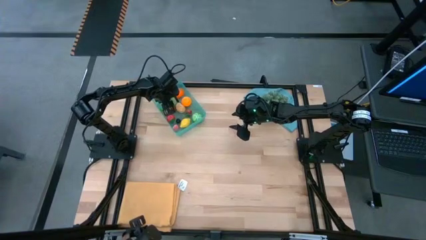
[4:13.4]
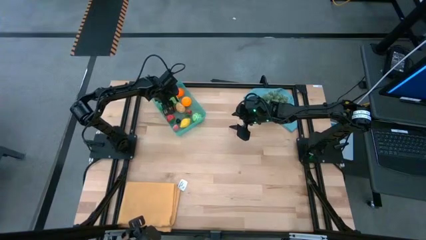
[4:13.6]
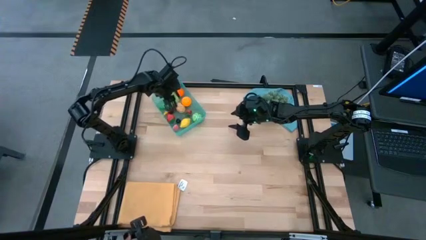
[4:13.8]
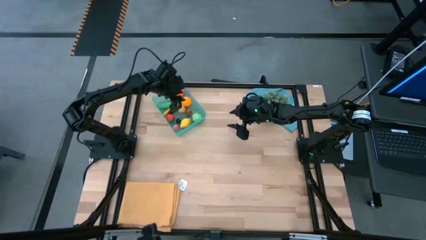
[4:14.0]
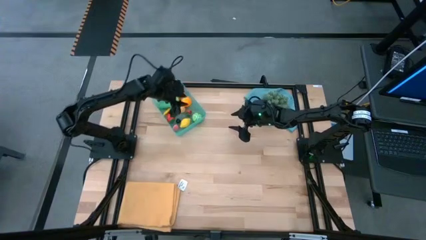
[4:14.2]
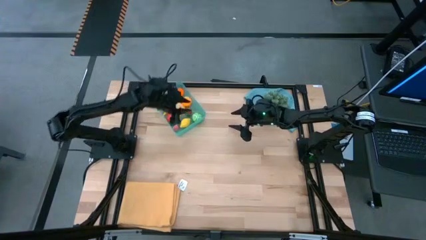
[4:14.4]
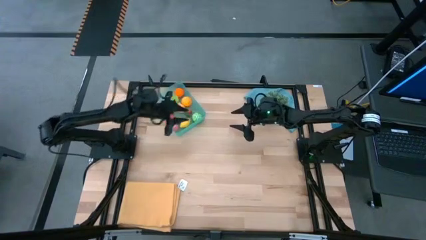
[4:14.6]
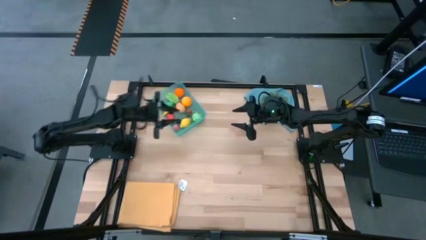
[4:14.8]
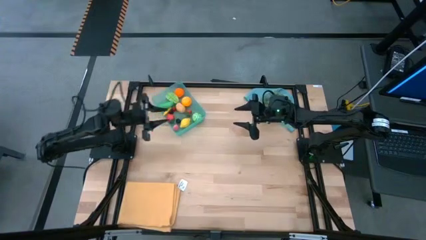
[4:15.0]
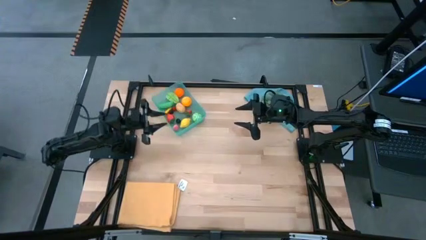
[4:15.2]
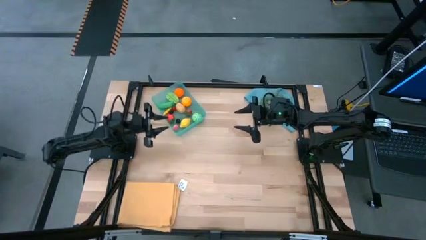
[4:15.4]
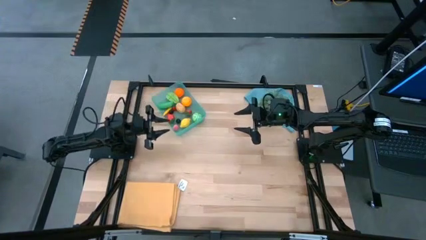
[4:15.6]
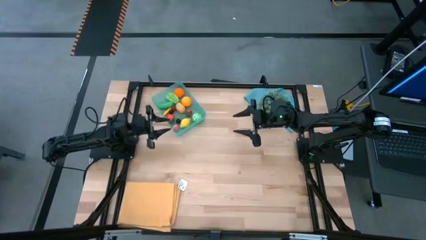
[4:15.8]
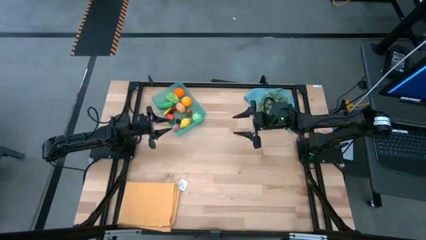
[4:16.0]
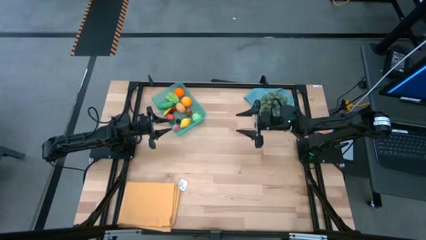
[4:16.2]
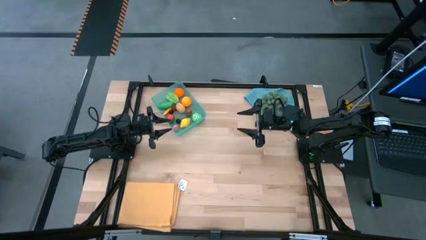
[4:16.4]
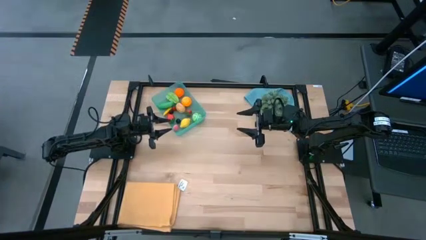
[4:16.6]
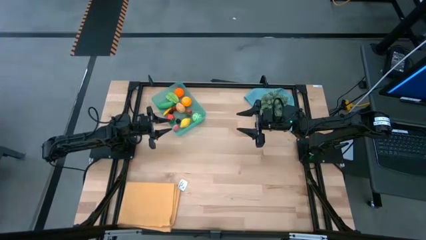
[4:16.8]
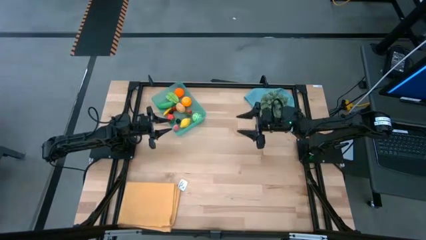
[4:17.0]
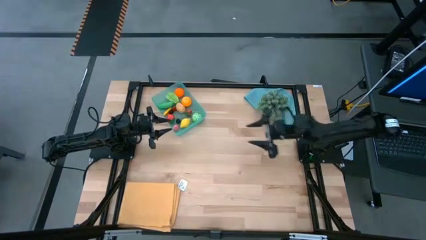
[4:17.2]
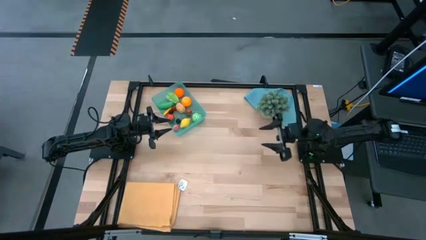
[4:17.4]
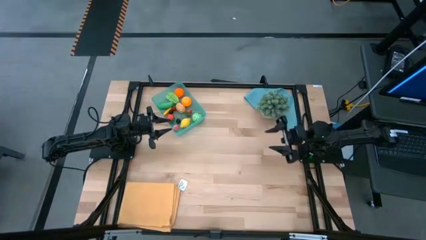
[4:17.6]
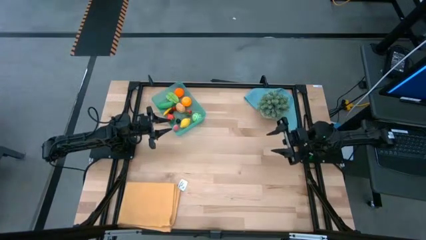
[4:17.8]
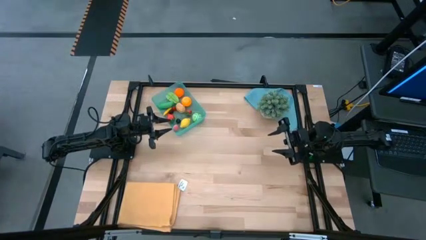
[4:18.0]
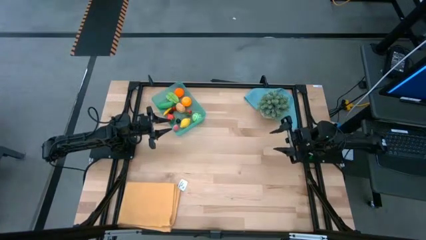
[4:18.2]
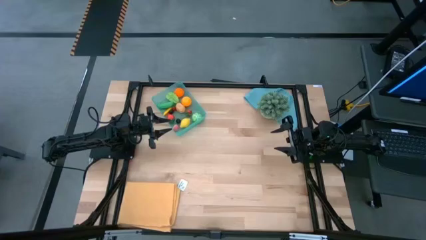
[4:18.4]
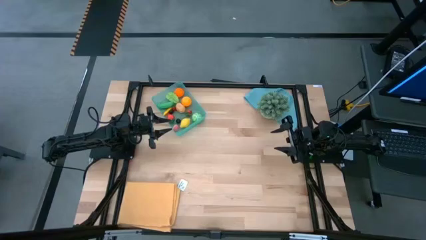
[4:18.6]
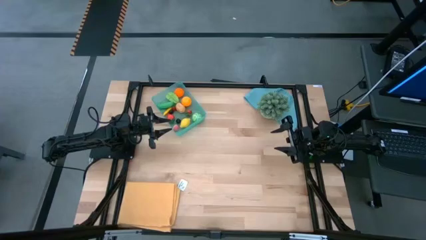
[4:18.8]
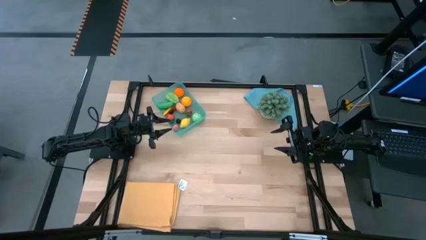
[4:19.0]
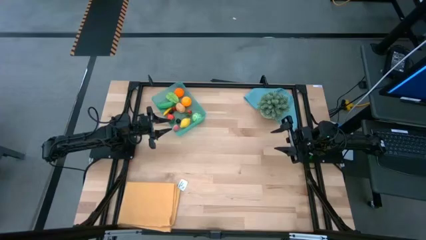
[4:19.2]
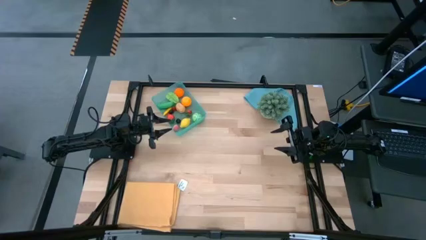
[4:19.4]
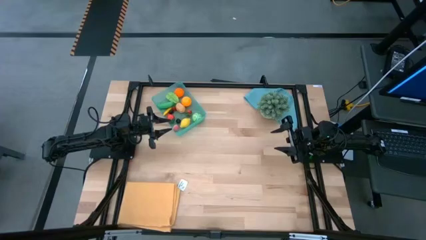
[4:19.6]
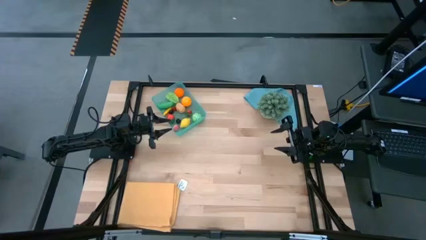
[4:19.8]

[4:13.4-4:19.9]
Task: Pick and placing Produce into tupperware
Return to Home Position

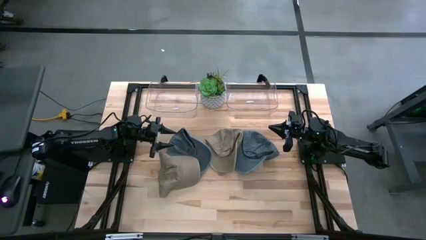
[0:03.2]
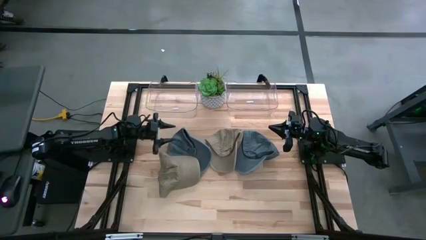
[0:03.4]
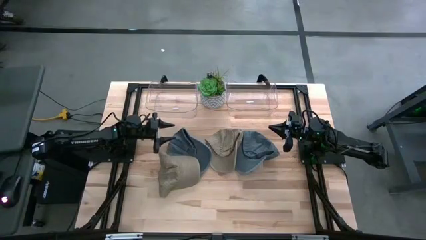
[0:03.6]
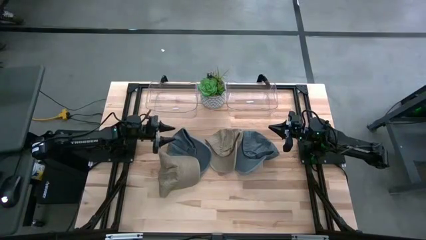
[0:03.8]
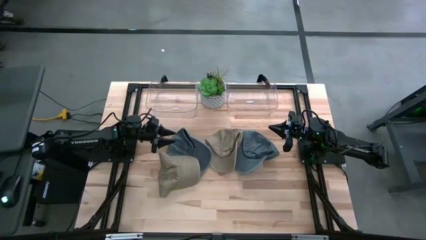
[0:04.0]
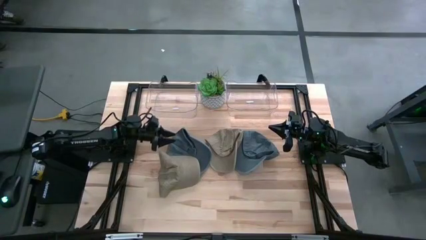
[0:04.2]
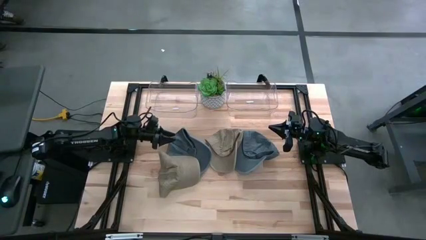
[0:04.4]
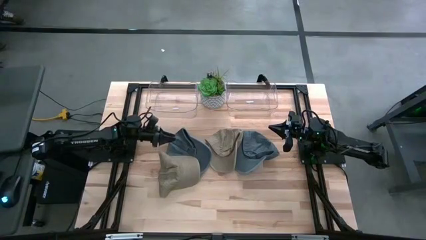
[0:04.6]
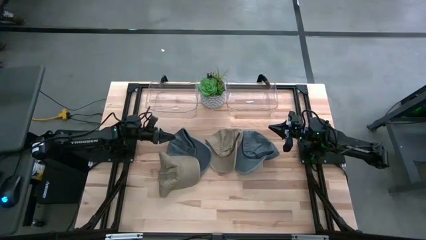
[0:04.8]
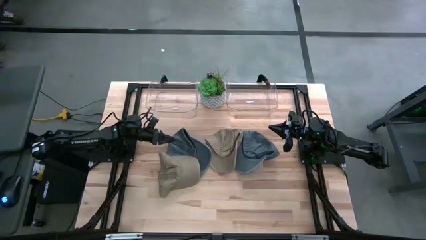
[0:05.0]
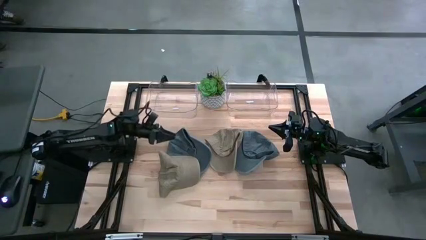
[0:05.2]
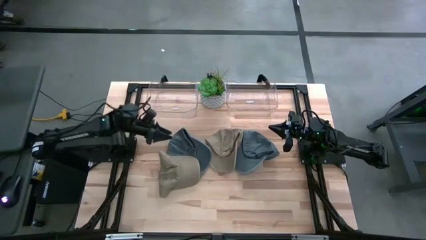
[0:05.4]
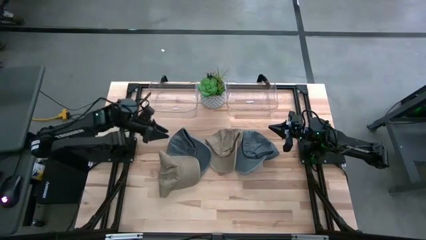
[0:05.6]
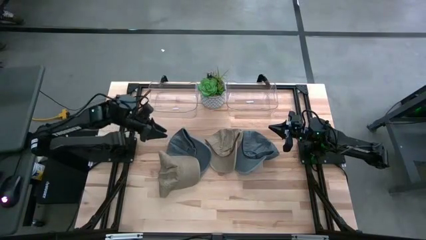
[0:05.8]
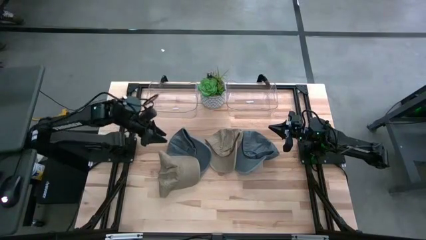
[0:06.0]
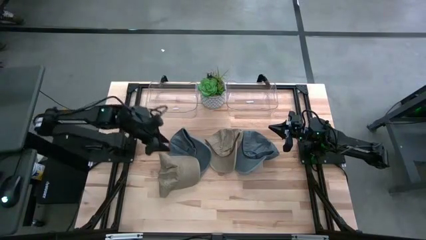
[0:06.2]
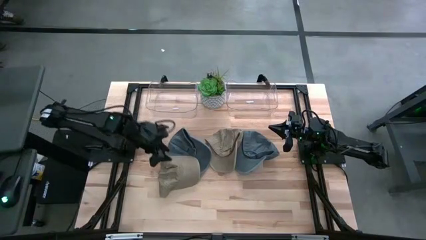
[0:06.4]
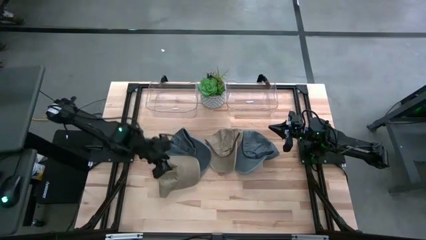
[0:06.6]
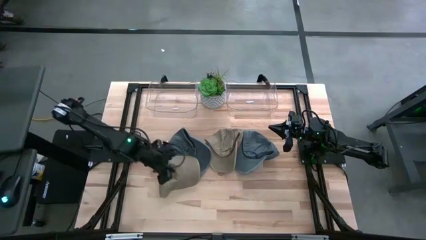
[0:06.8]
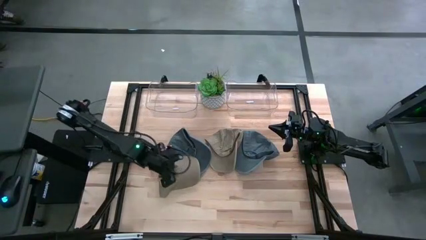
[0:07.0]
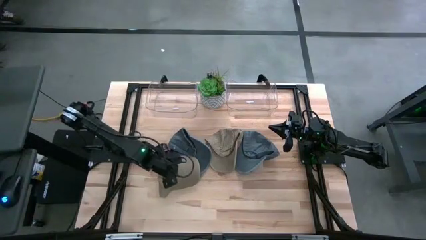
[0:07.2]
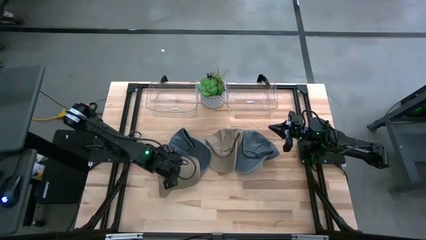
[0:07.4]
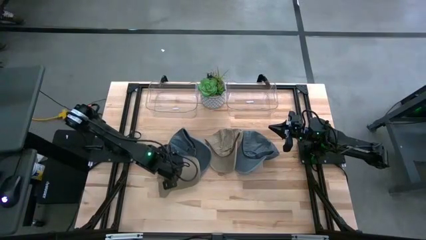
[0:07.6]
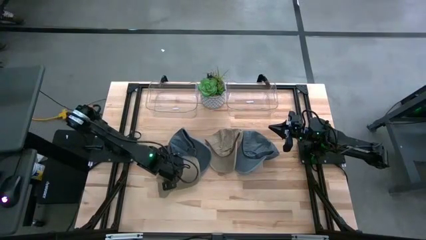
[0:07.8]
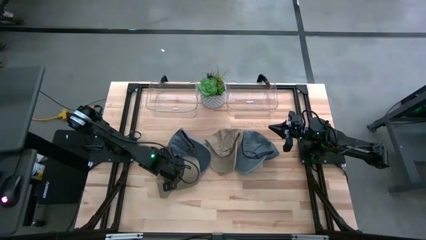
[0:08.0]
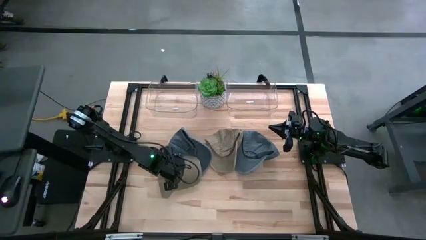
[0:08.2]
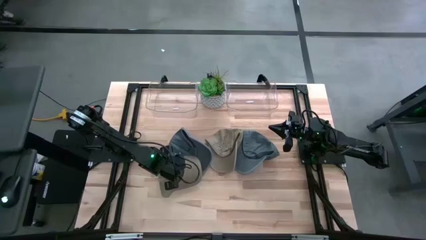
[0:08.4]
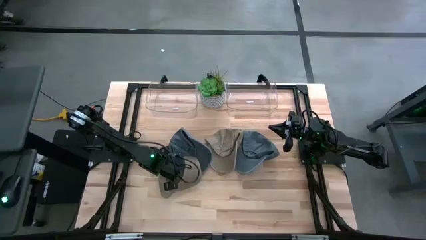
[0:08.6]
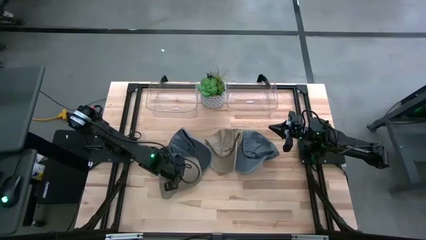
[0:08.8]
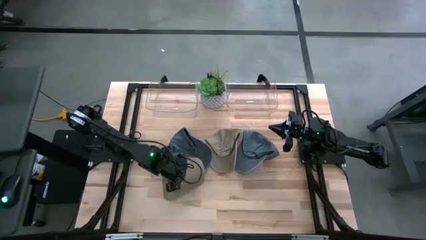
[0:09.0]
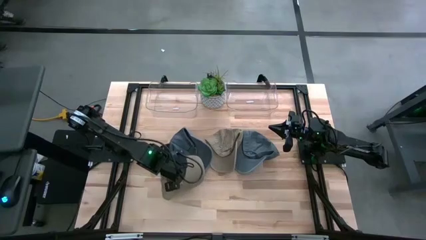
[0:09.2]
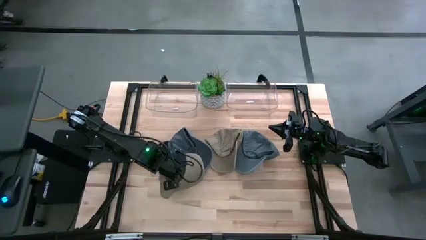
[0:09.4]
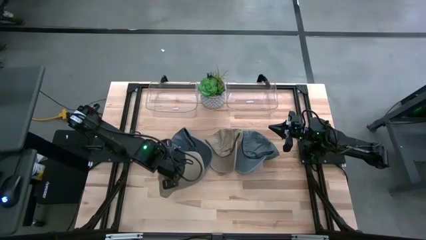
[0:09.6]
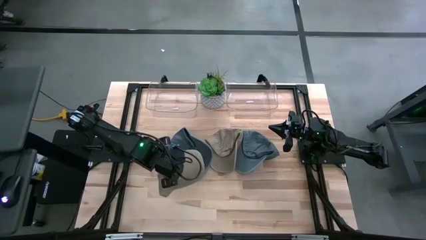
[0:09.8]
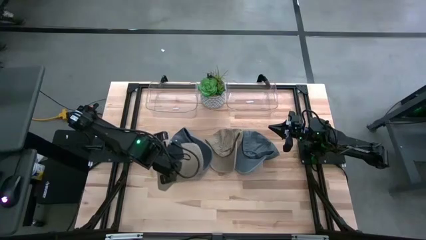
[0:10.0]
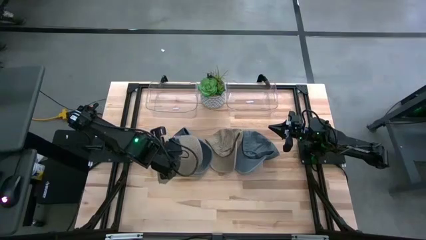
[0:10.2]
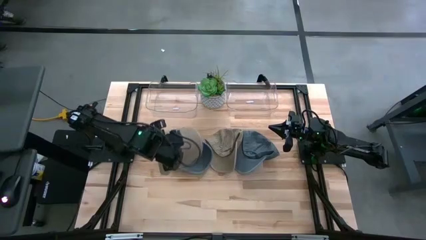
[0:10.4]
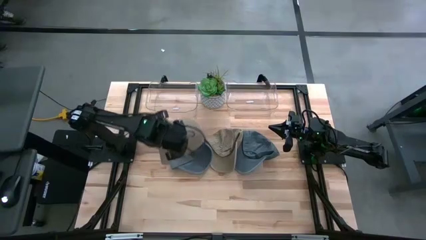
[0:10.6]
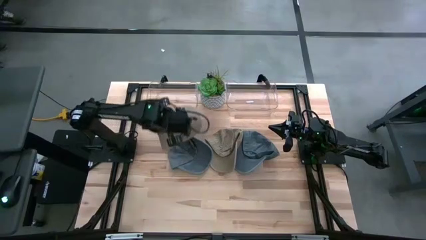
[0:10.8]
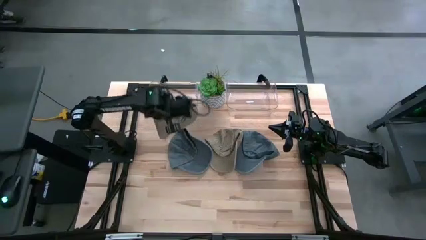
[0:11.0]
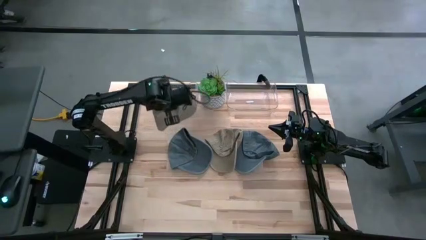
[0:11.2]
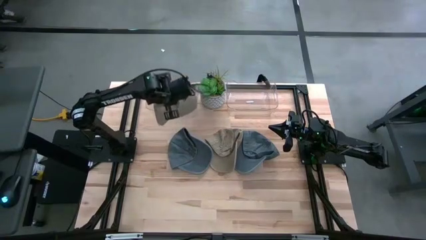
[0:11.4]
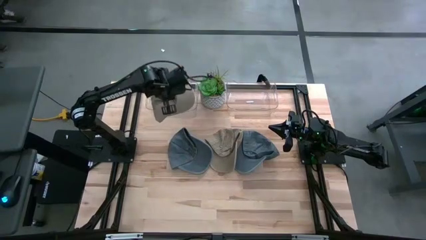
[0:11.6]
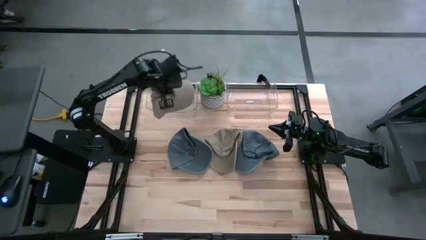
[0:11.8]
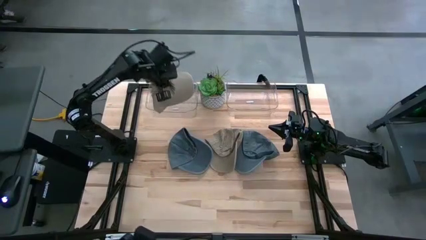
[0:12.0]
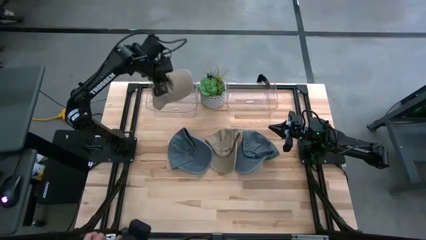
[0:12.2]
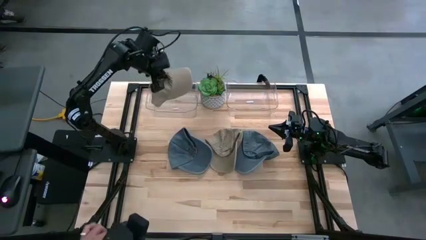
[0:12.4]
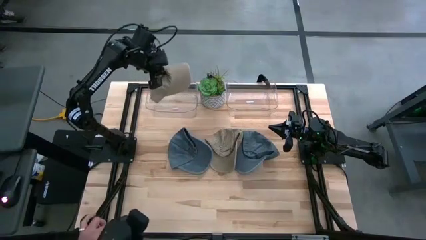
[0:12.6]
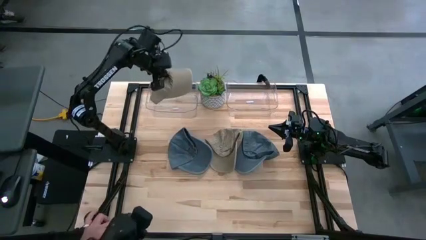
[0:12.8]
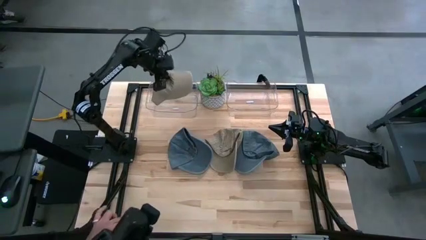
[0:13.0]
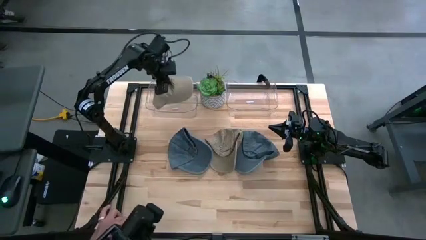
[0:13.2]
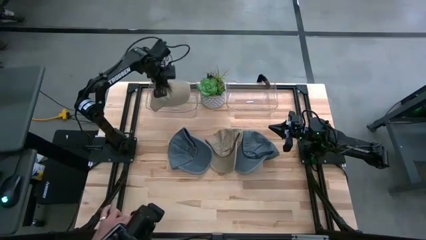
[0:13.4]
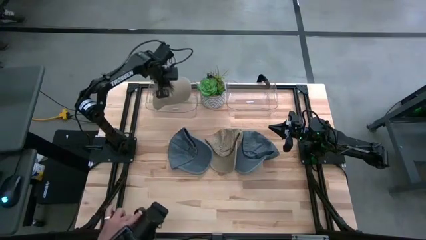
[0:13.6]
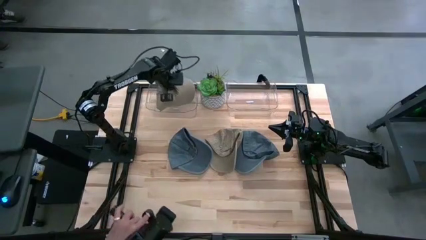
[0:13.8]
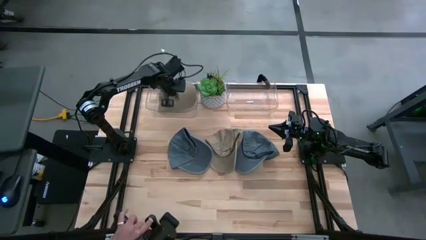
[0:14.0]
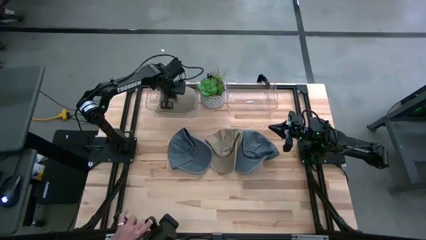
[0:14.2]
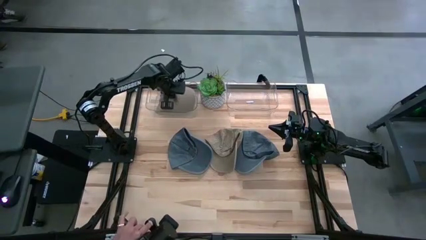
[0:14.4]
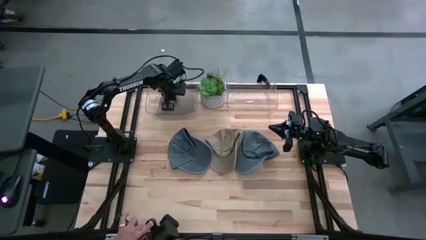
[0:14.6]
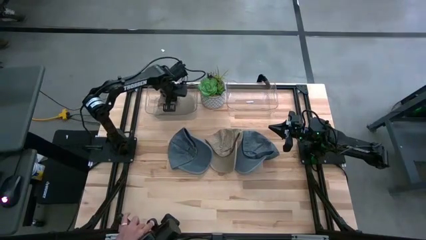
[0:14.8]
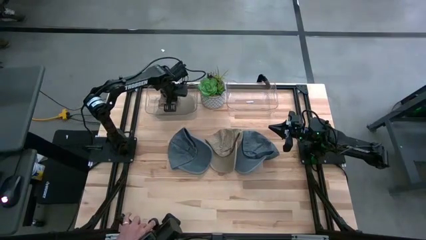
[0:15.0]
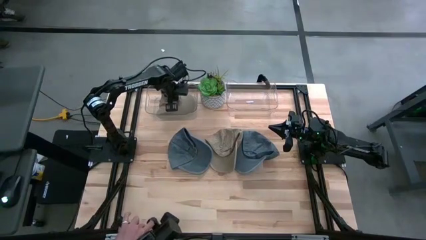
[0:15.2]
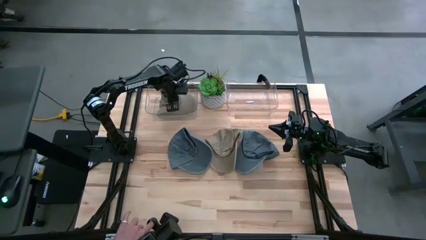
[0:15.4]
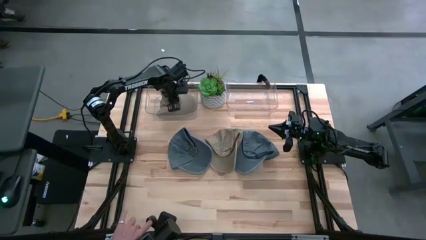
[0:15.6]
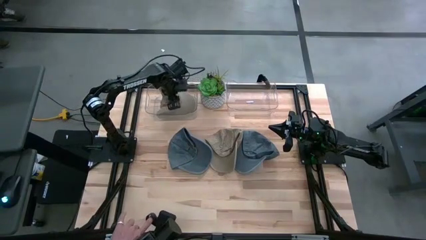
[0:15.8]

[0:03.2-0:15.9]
Task: Pick & Place hat
Put the left brown cap into the left transparent bin
